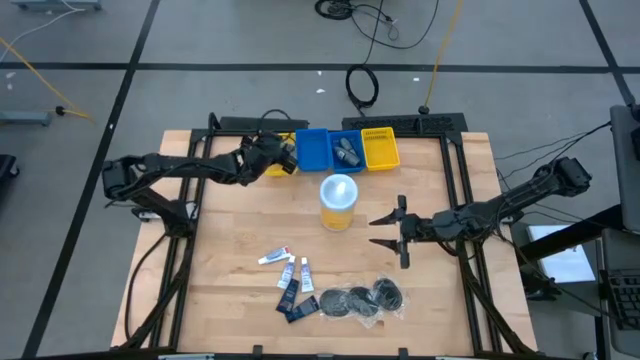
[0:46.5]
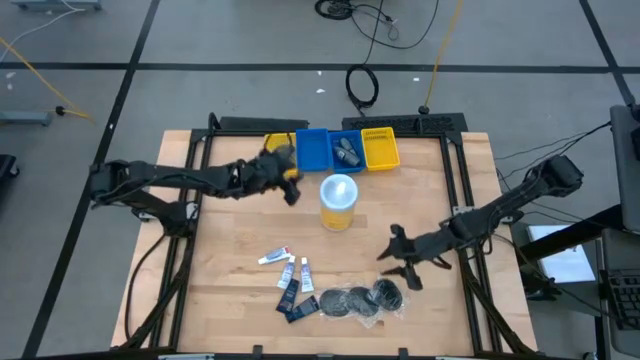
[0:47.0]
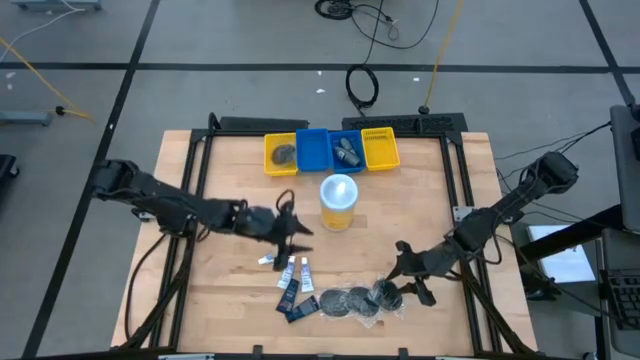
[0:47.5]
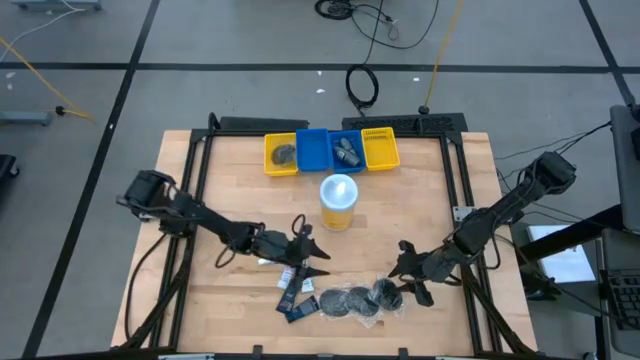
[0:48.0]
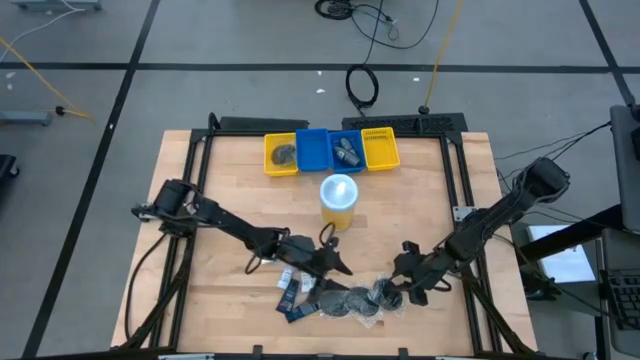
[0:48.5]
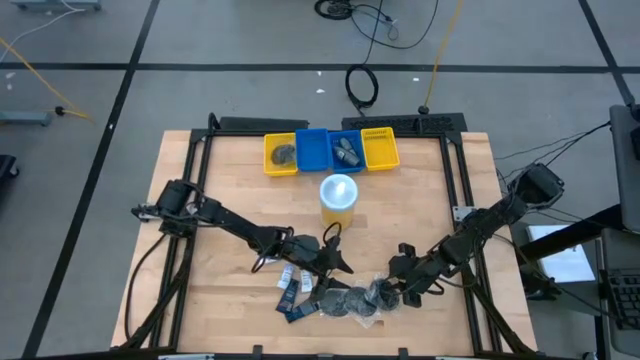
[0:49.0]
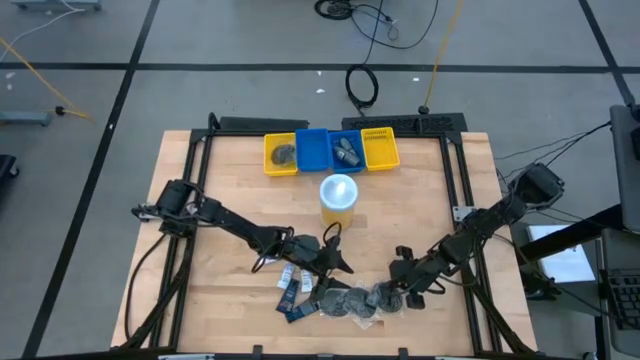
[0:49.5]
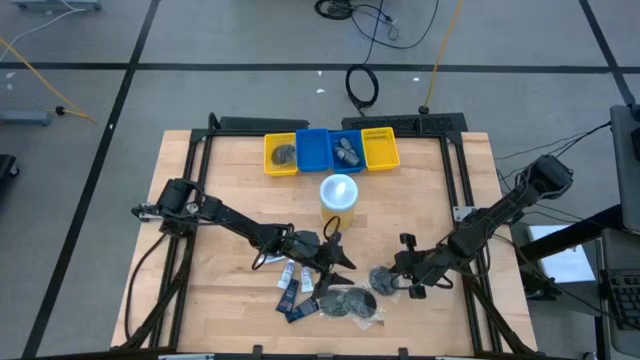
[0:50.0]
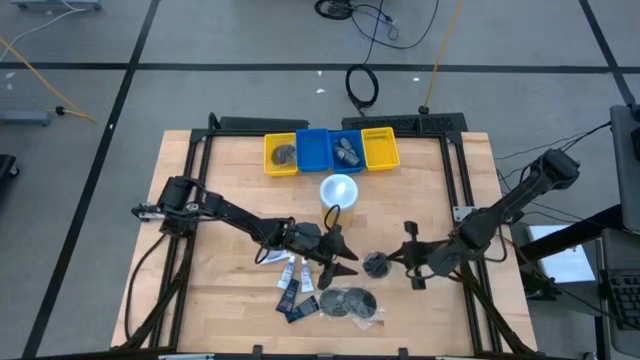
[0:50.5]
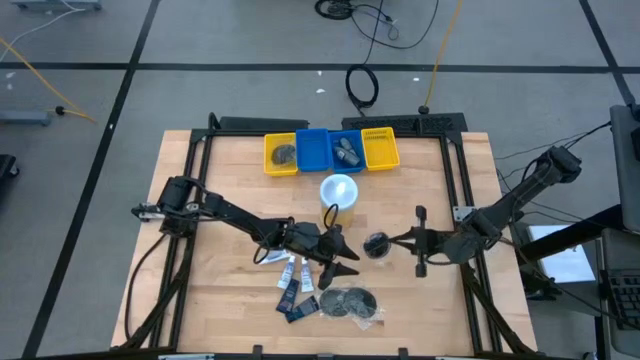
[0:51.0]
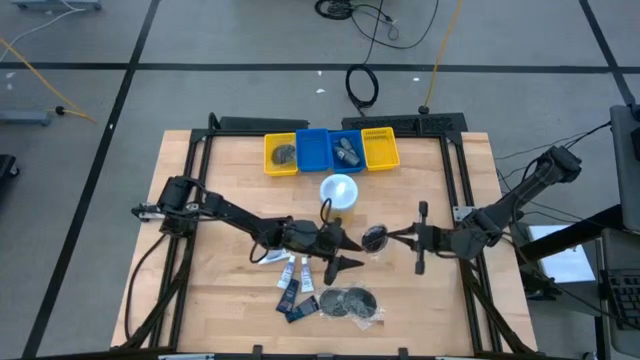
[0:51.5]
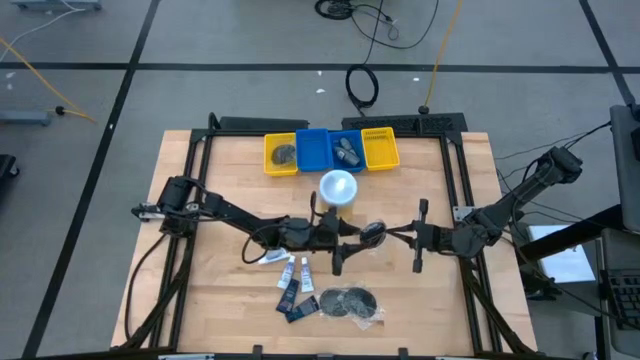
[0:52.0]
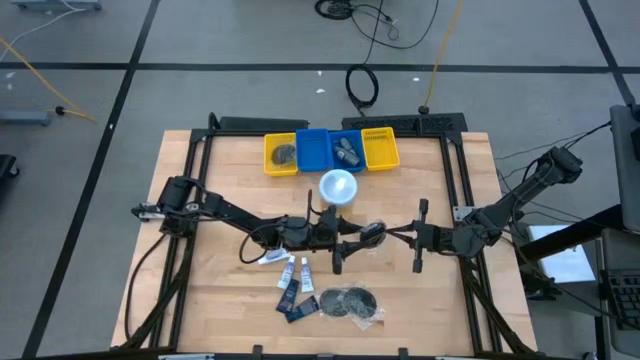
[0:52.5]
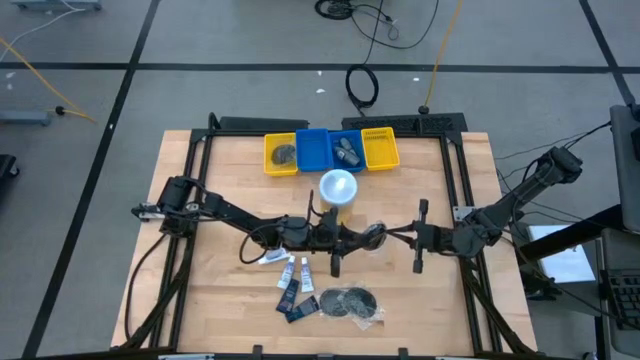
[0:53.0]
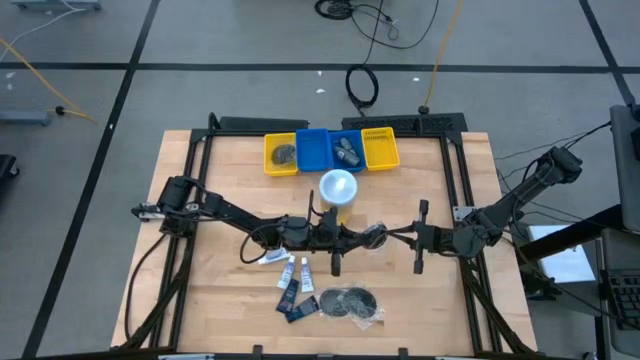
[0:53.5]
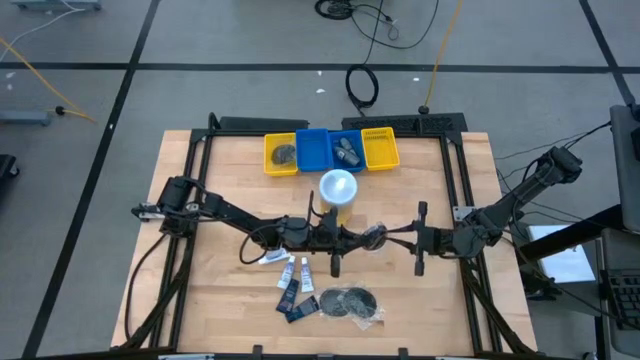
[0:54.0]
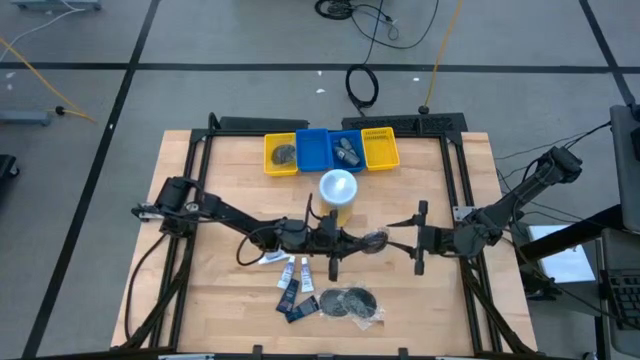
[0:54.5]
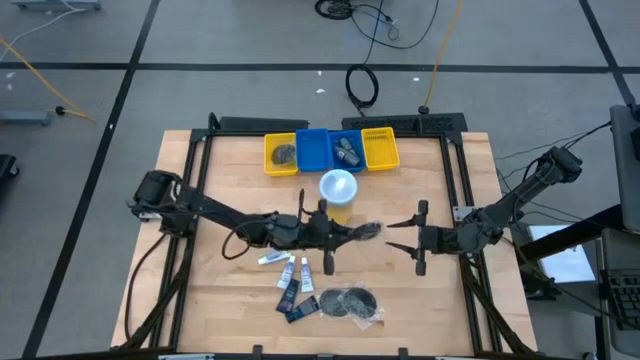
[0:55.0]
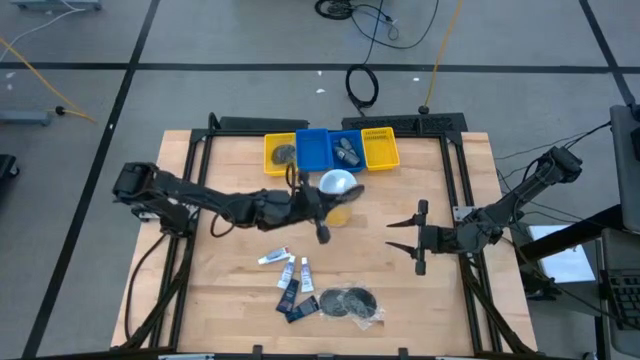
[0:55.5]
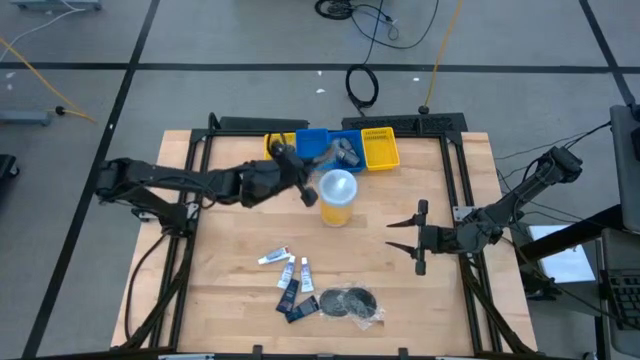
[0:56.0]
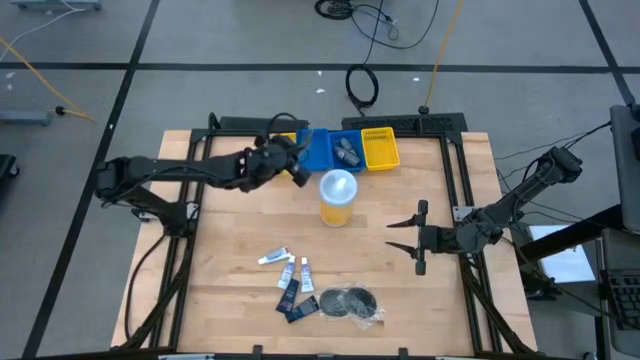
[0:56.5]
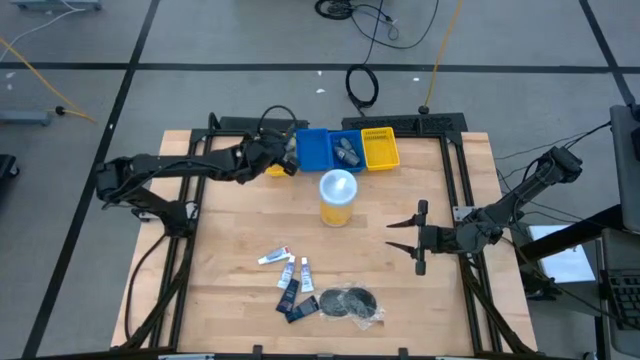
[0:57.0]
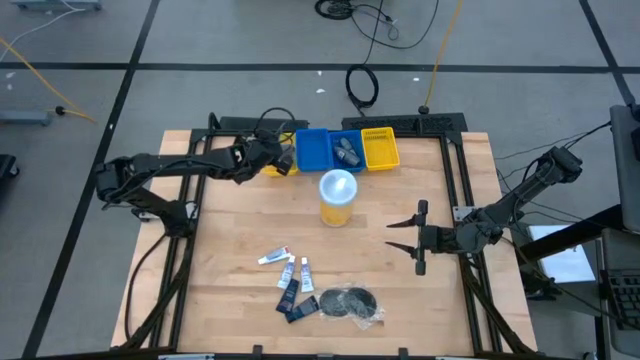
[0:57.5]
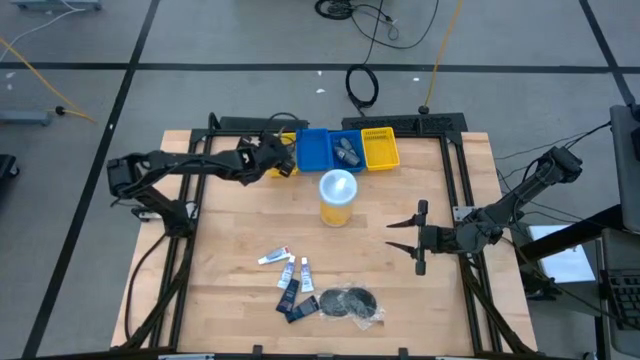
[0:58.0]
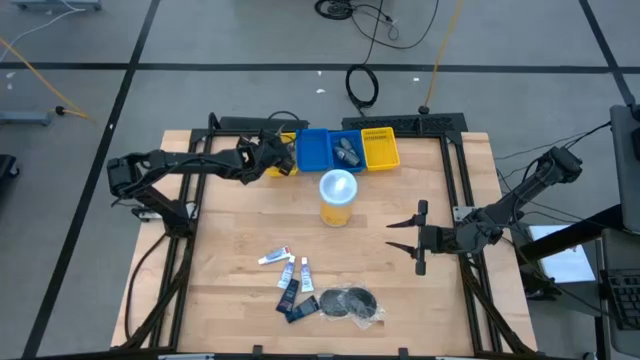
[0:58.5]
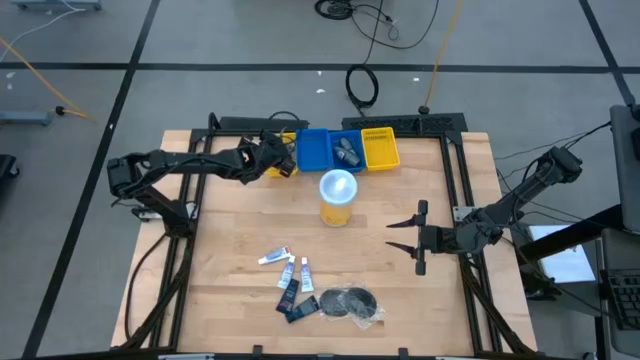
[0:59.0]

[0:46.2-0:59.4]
Task: Pick & Place Travel size toiletries
Put the hairbrush into the left yellow basket

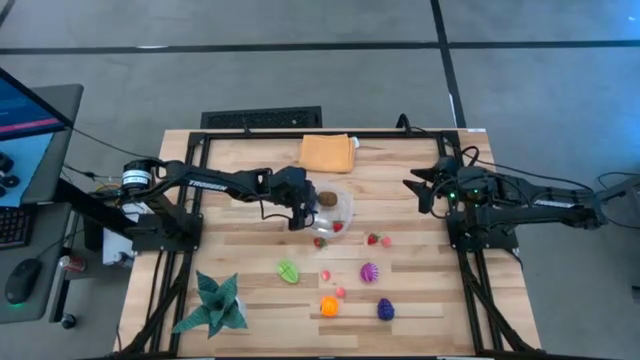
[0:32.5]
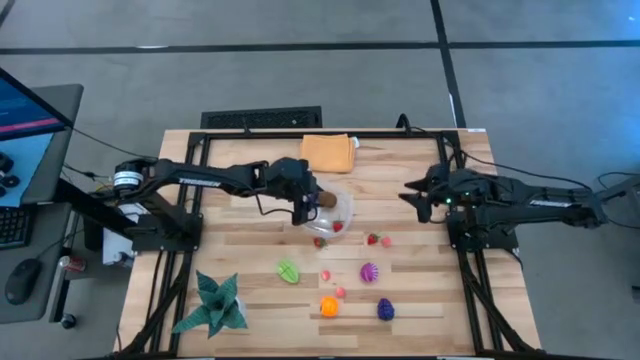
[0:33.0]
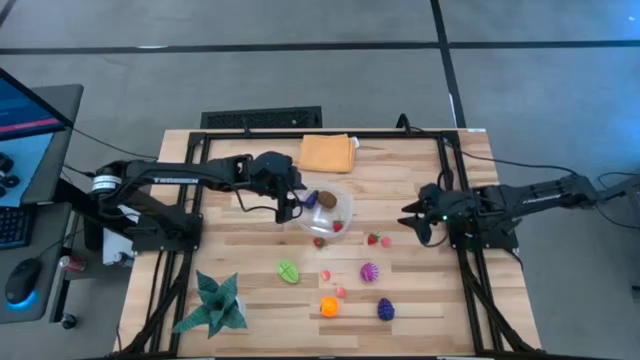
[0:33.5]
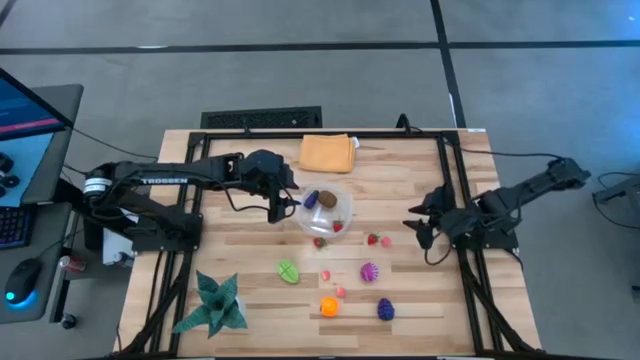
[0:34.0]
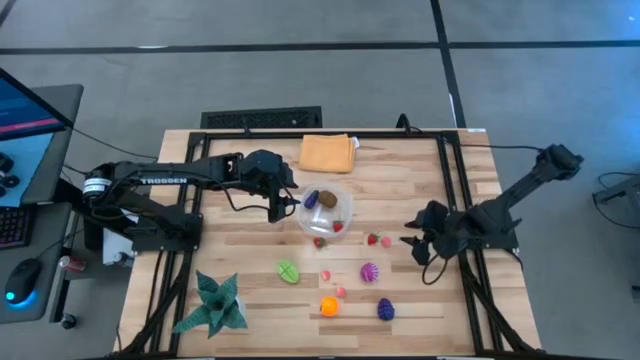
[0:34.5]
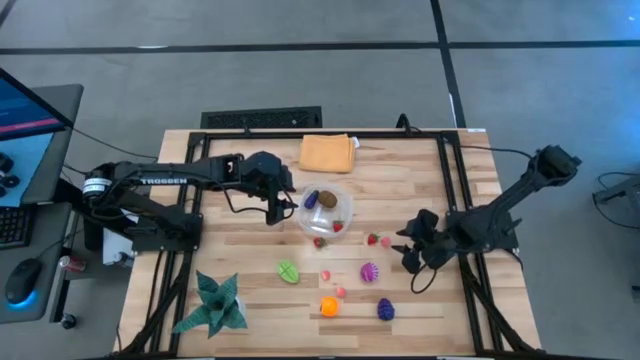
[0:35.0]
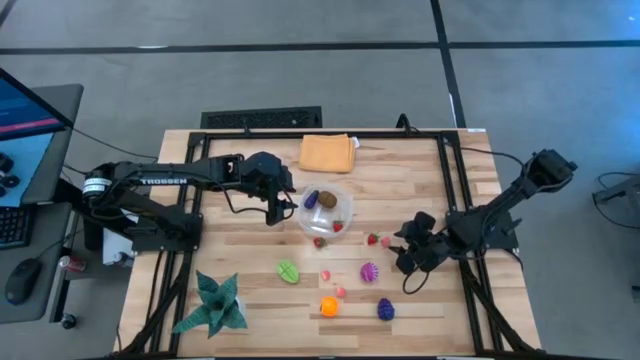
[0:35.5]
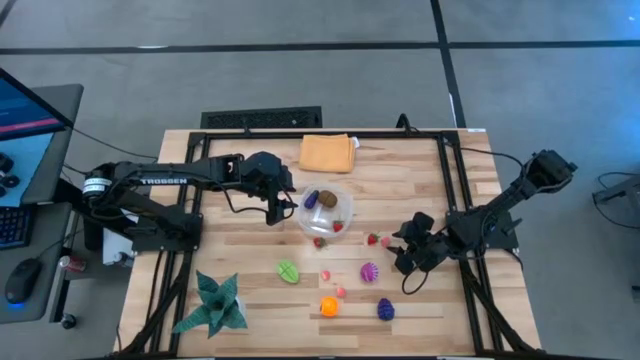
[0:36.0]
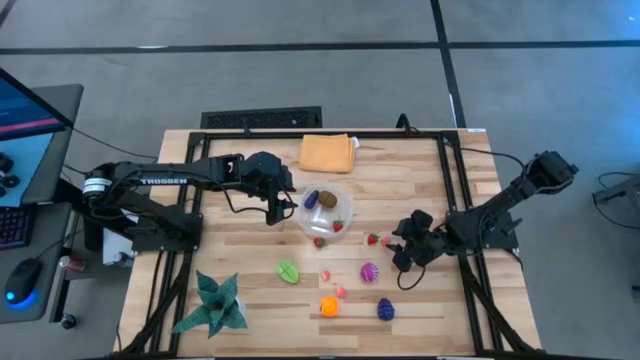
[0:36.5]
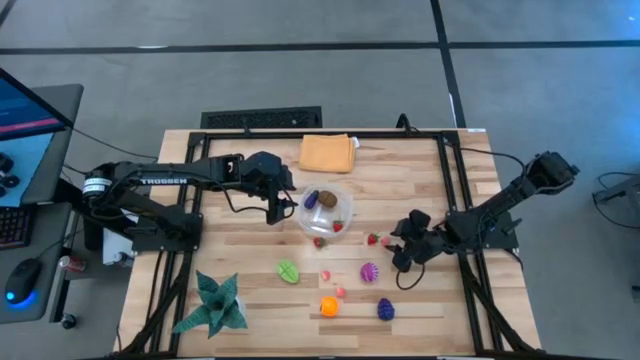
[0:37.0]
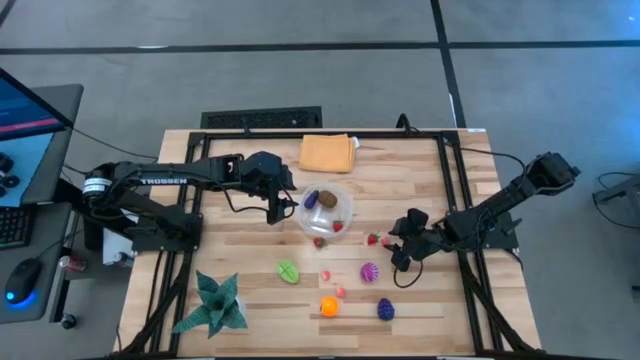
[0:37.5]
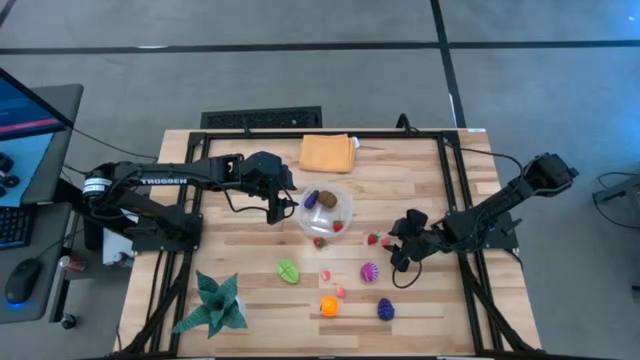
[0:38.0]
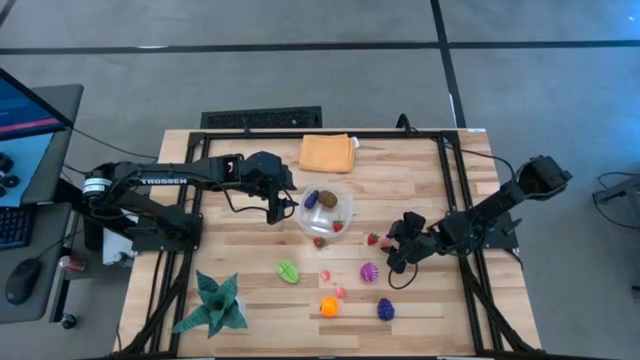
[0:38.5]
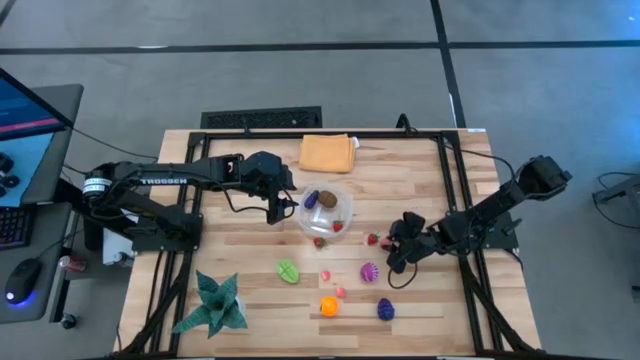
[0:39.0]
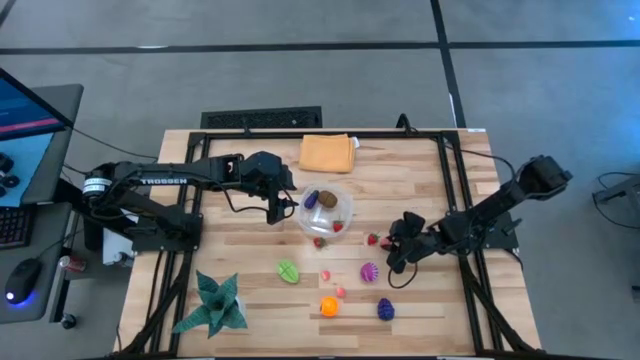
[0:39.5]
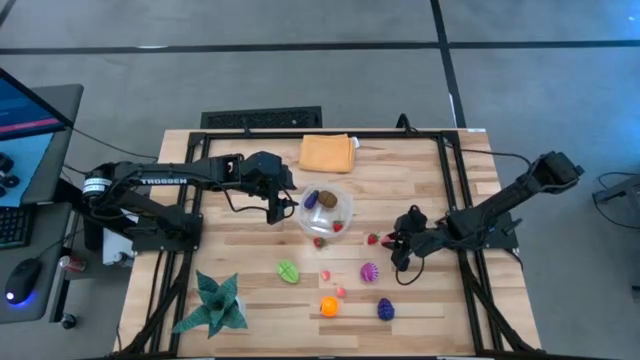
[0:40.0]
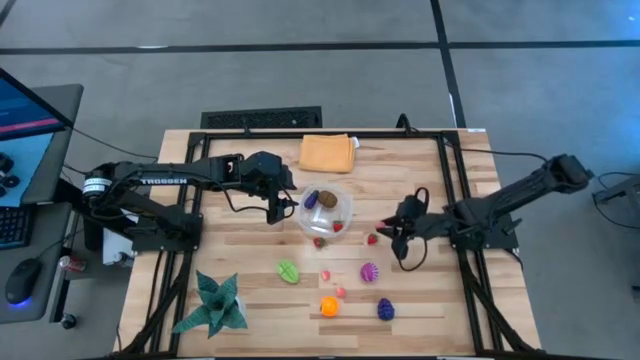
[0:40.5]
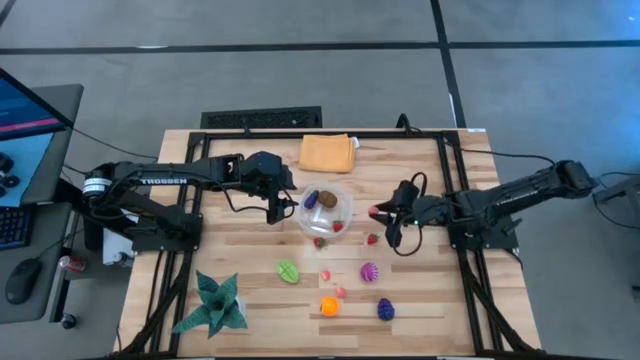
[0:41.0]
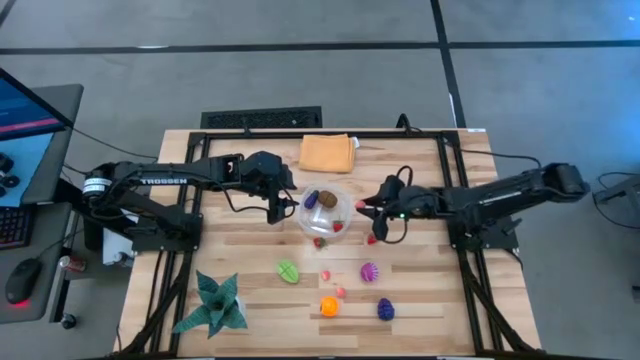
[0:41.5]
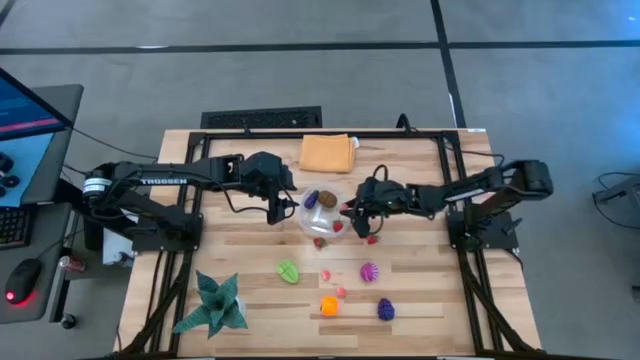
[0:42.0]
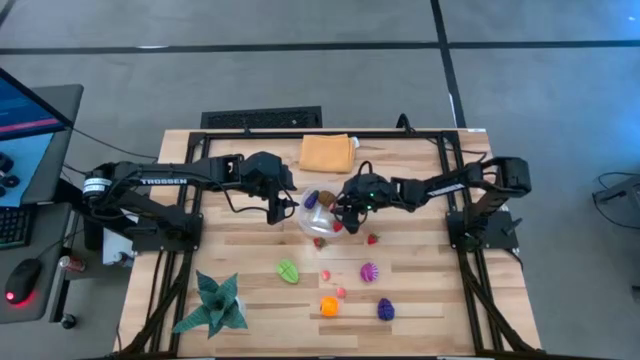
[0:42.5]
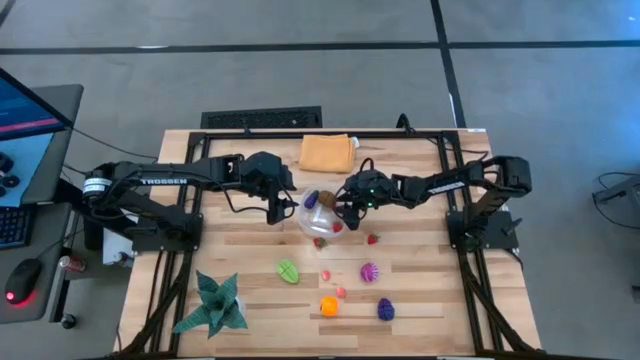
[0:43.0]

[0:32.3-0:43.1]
Task: Pick and placing Produce into tupperware
Put the top pink peach into the transparent container
